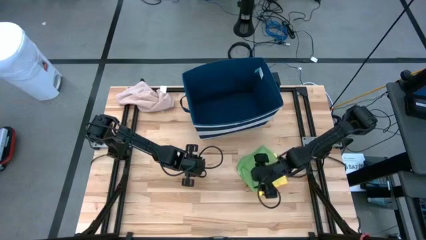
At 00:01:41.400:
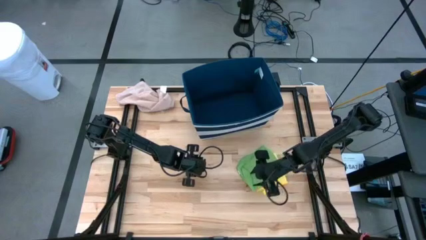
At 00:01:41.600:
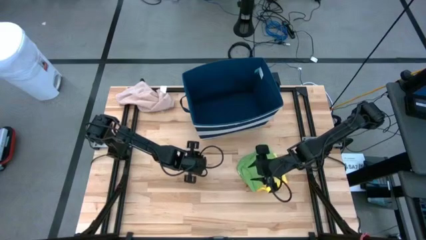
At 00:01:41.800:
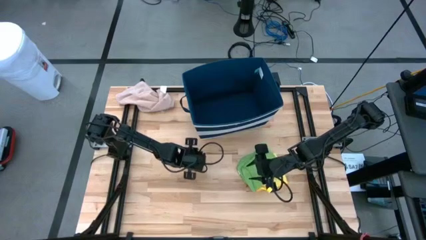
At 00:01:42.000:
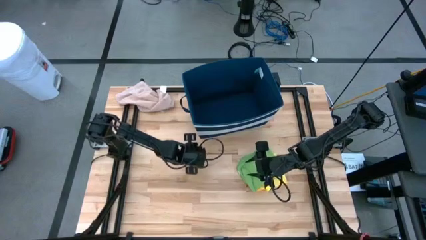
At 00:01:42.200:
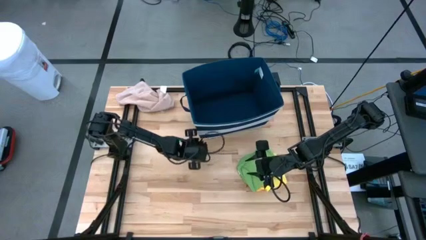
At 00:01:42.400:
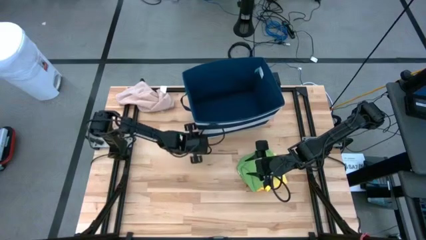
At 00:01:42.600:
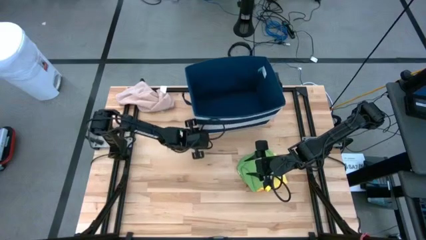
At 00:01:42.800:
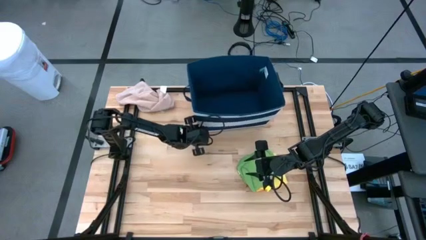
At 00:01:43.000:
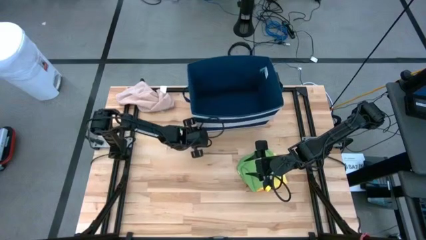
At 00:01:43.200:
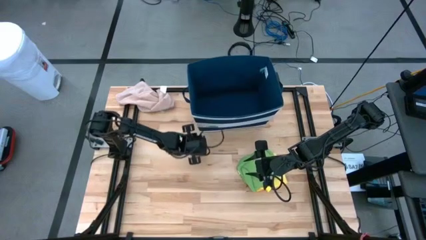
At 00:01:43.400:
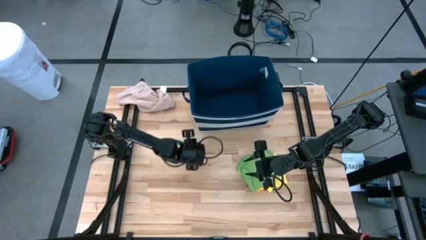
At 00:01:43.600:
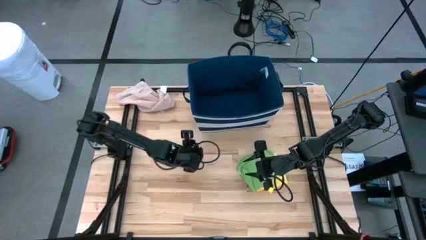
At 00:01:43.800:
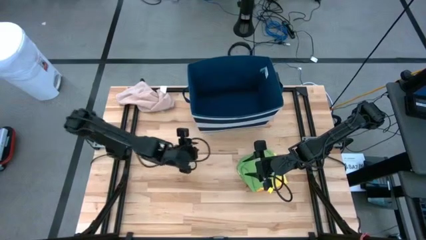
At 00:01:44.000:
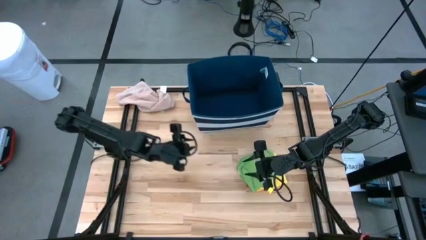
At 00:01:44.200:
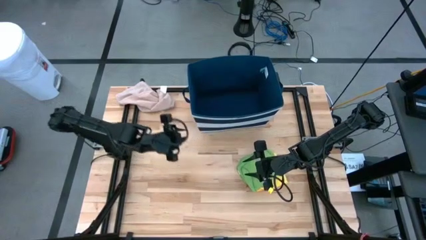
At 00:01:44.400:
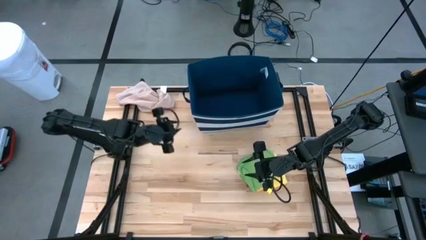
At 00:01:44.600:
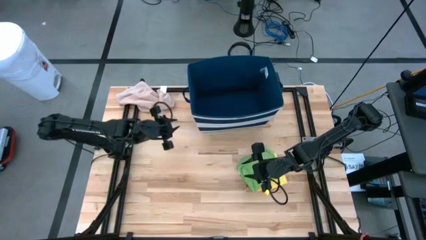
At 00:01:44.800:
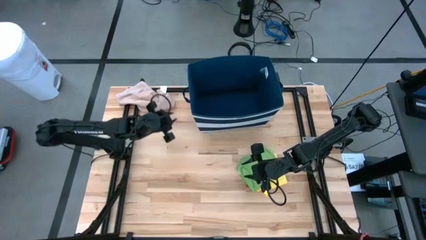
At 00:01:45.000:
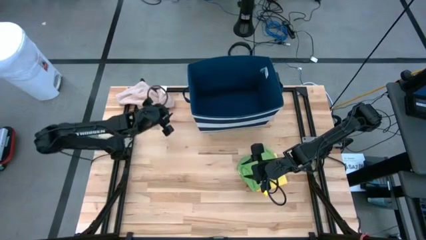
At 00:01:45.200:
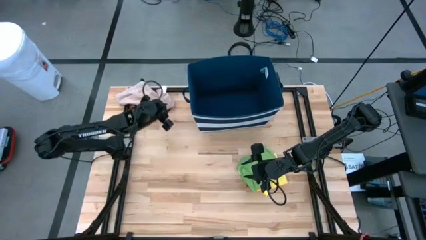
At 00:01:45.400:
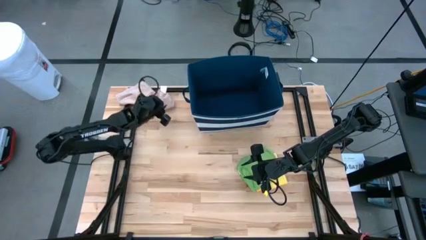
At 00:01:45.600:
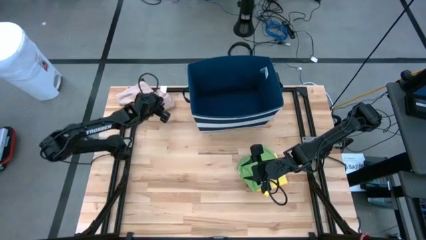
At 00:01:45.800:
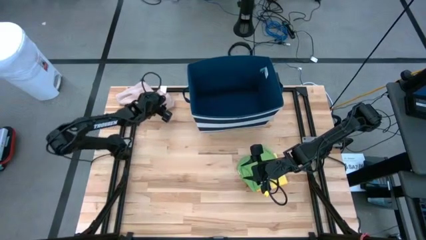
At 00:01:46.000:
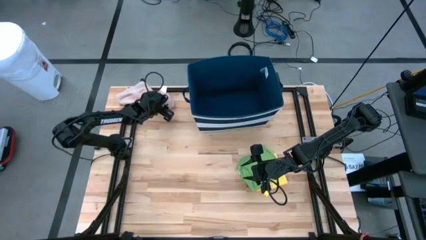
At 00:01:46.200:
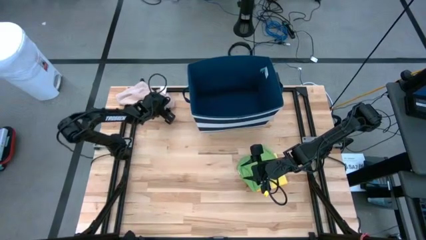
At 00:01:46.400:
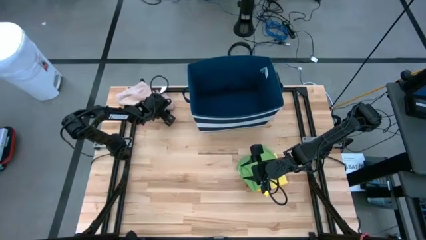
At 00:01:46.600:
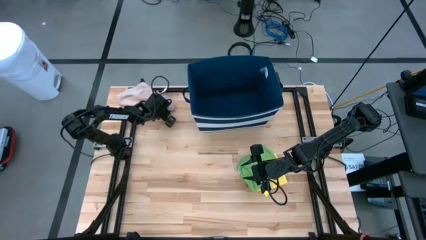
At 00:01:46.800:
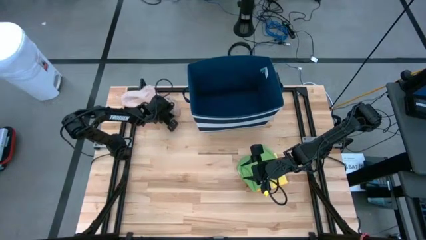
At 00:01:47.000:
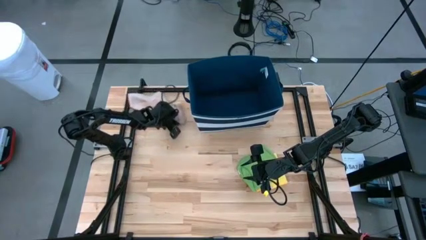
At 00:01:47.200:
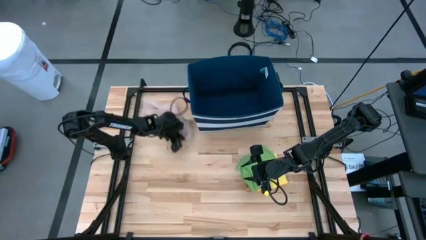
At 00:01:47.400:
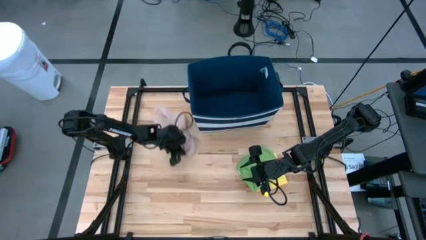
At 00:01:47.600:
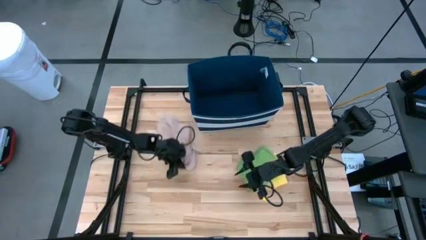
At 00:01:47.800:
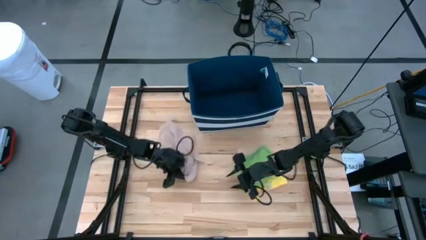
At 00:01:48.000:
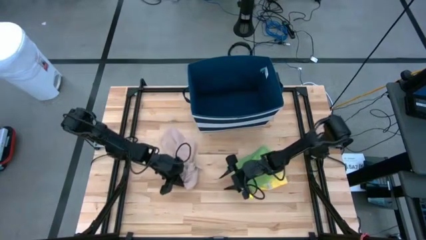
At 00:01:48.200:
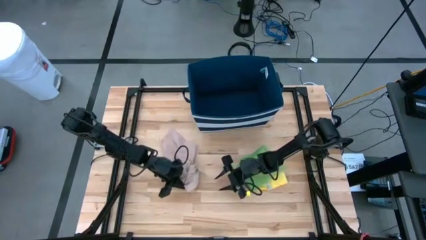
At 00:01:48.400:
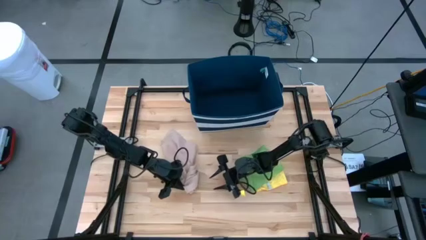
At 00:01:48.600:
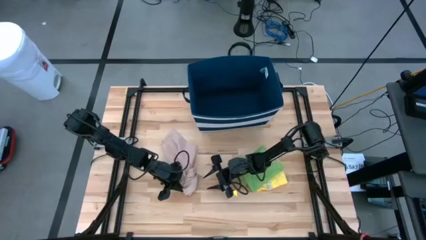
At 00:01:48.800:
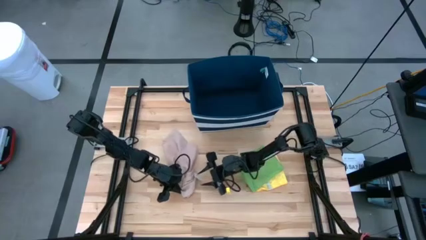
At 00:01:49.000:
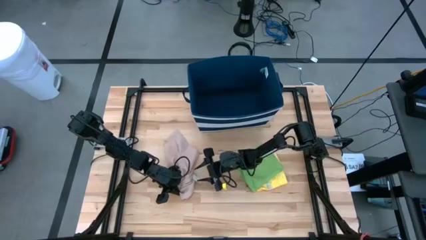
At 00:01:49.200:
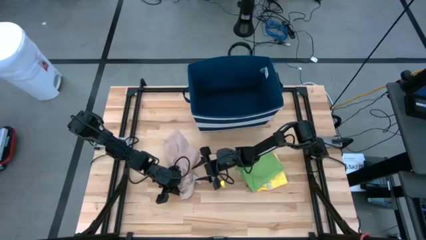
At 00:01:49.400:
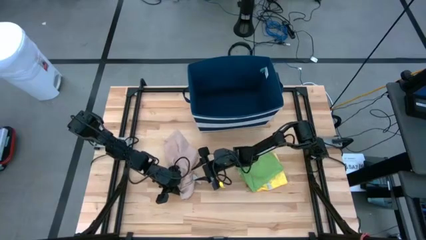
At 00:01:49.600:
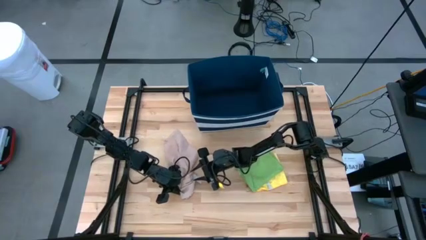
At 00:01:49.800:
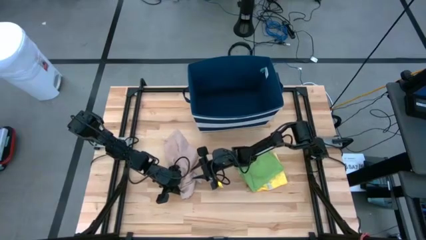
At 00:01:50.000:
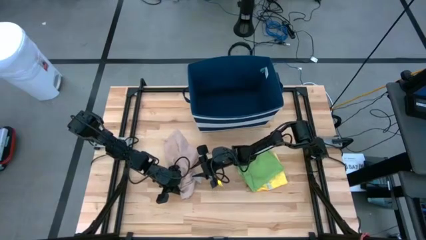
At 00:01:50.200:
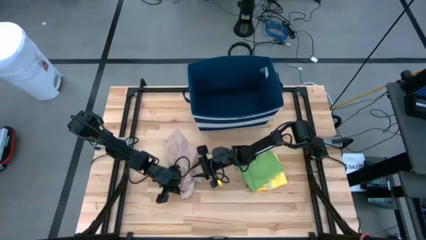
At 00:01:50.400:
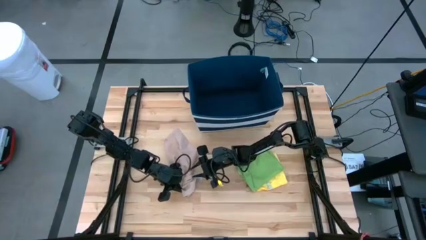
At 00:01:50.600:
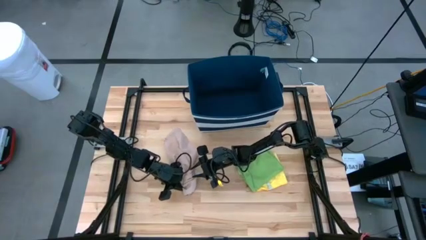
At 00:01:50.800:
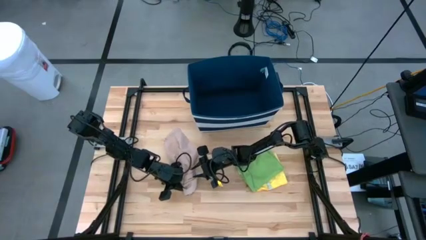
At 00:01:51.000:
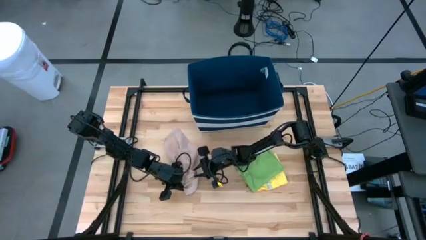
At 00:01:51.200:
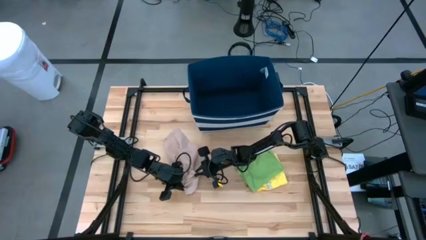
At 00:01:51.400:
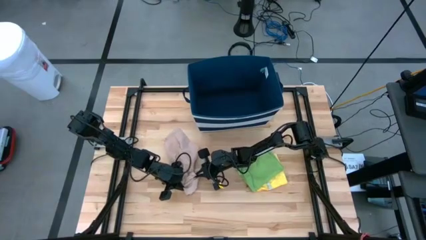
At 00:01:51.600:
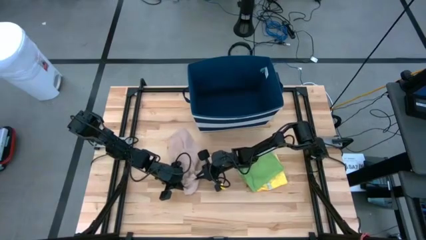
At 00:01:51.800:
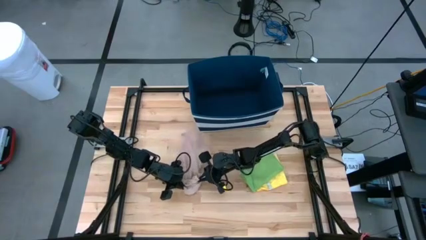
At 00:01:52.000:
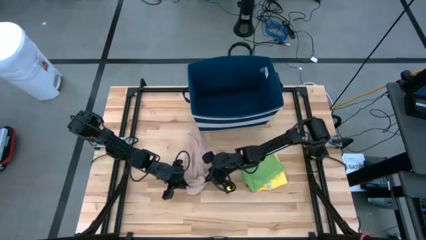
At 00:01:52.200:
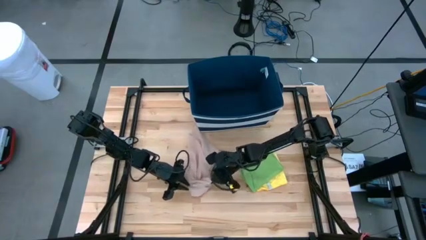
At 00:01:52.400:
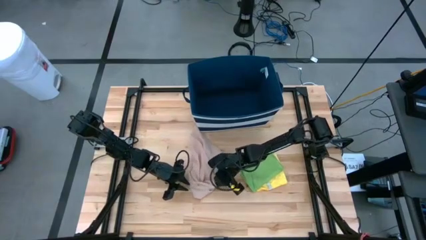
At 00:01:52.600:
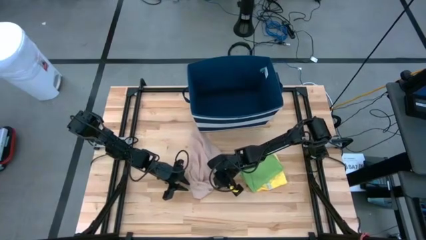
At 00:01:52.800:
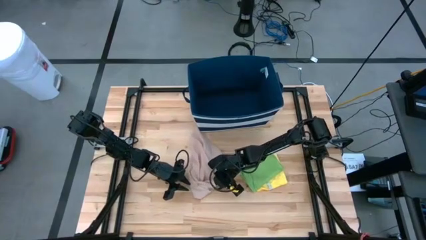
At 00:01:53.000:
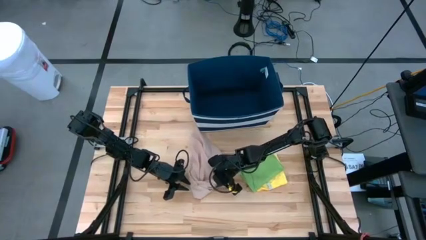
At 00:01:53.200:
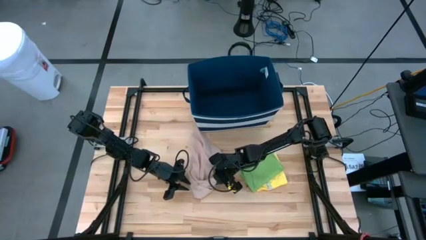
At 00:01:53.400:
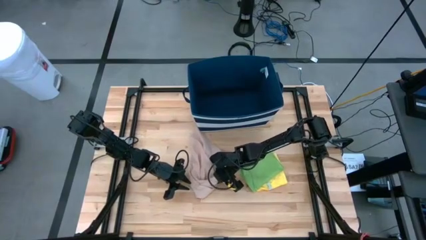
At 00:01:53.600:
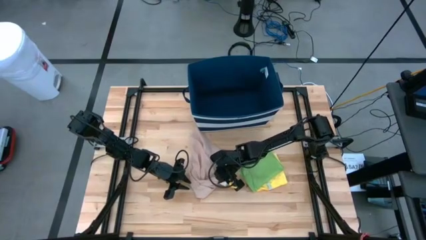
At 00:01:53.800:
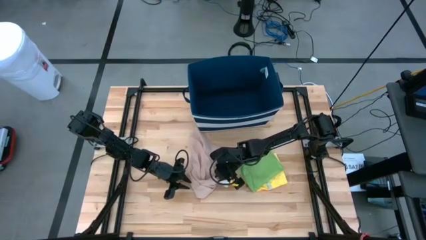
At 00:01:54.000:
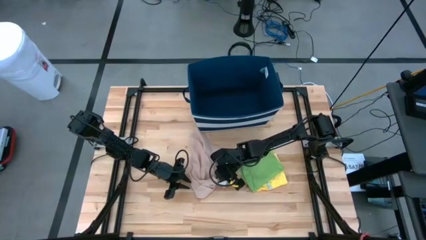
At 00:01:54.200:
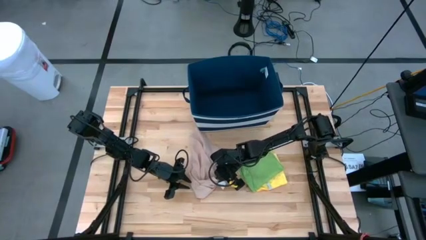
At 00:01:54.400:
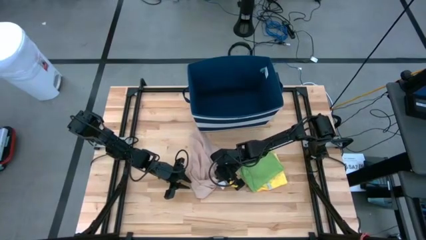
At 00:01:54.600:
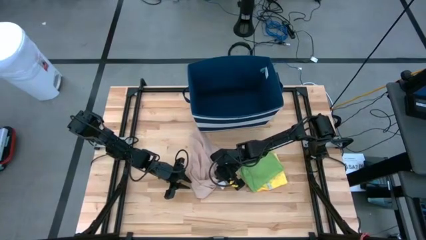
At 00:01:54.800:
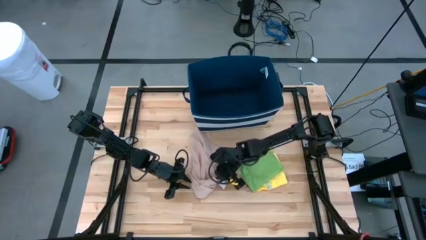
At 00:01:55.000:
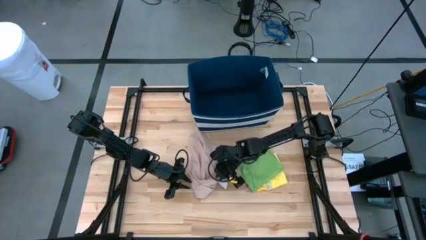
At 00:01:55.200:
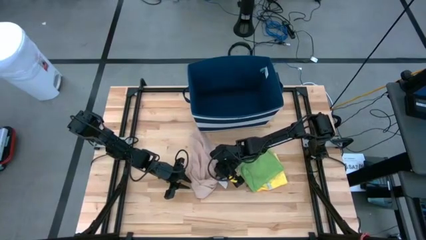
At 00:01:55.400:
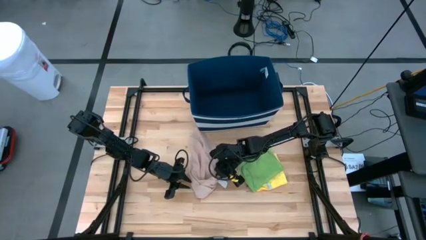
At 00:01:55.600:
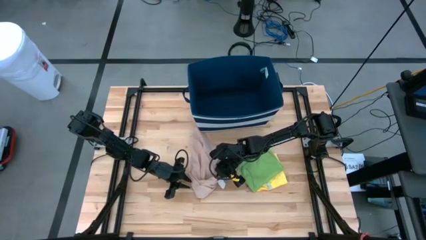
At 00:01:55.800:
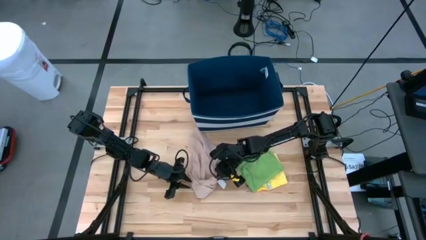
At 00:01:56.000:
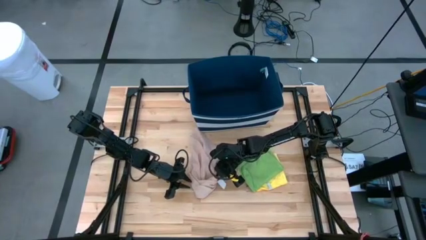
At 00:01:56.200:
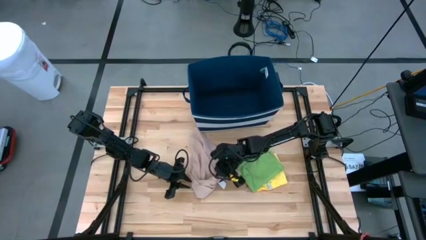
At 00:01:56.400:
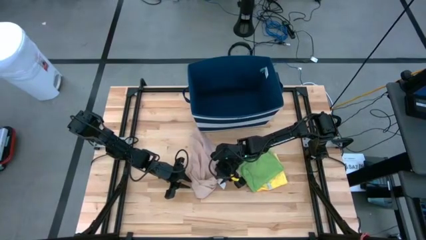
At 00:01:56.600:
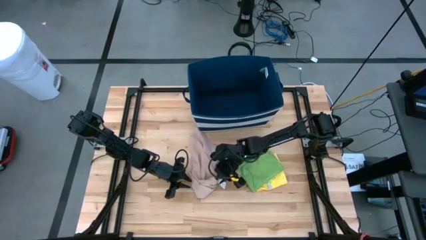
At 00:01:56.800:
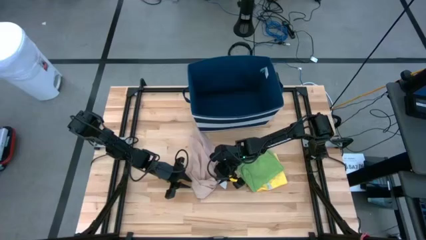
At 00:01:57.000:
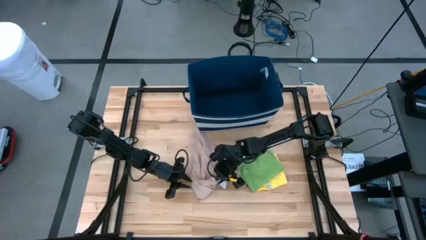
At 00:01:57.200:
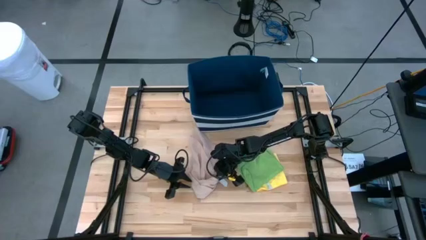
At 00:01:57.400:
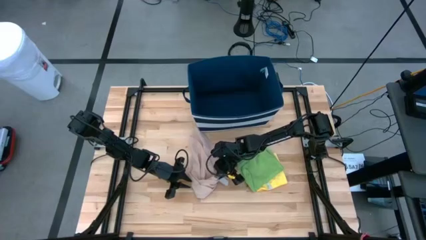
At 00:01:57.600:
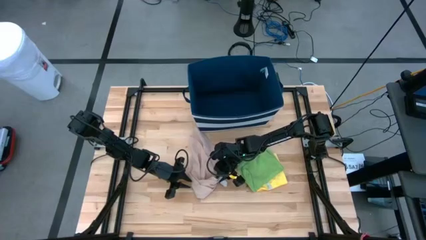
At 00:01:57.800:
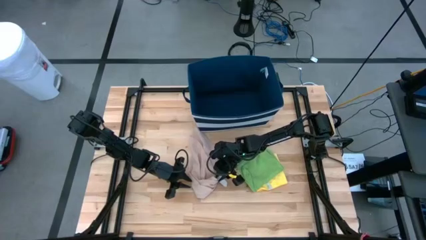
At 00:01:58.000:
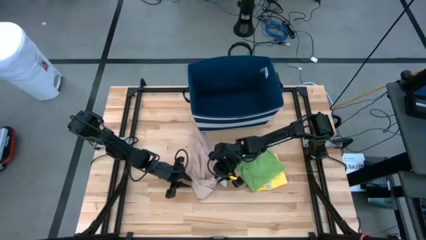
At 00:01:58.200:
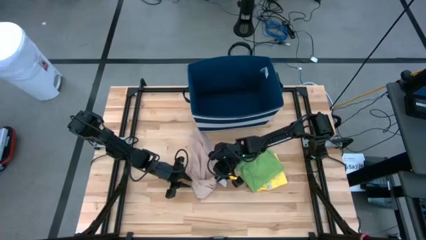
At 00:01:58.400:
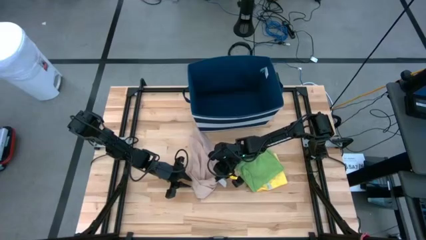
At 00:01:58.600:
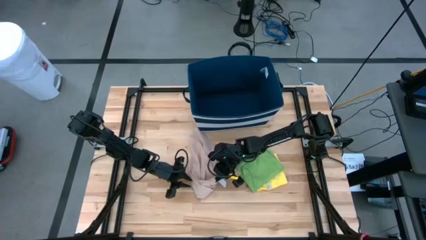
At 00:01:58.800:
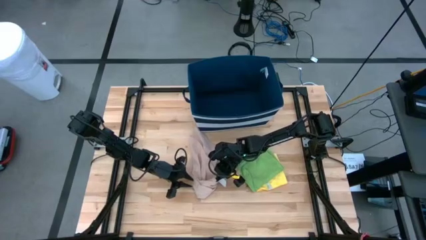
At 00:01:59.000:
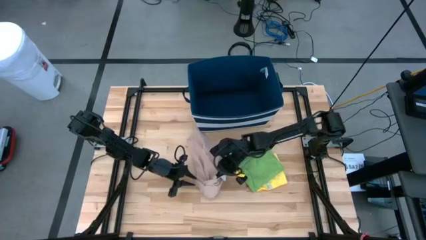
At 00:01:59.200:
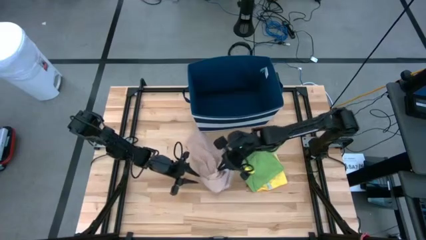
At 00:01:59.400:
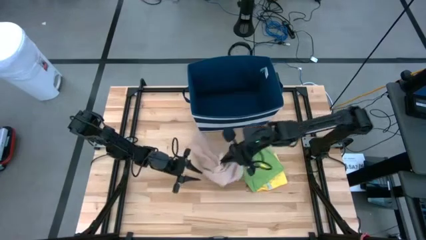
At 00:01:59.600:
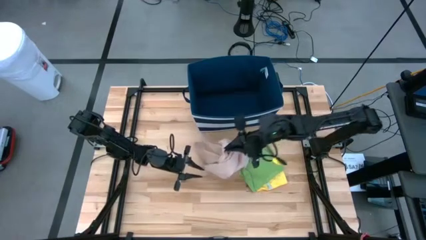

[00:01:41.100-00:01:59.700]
Task: Fold towel
Fold the light brown towel
